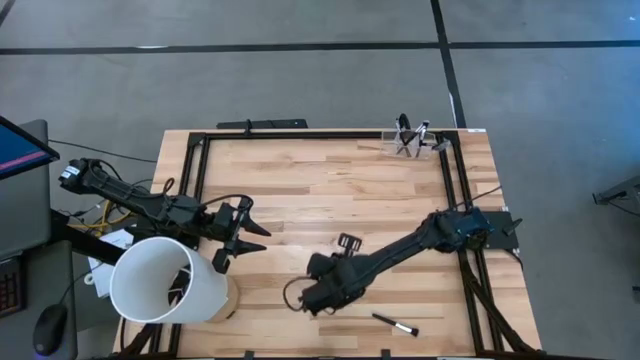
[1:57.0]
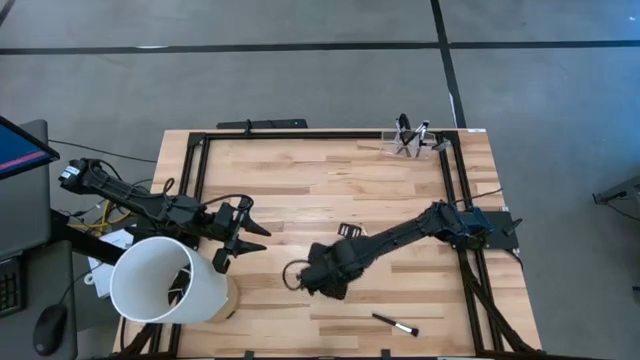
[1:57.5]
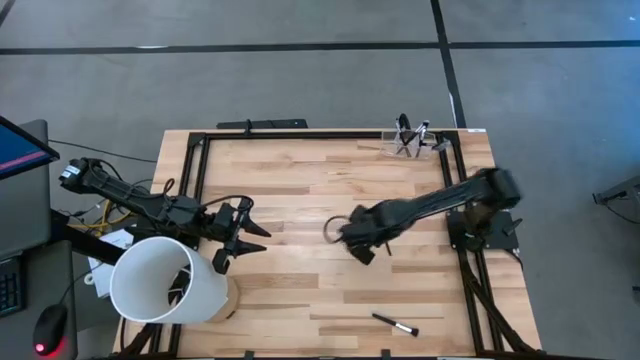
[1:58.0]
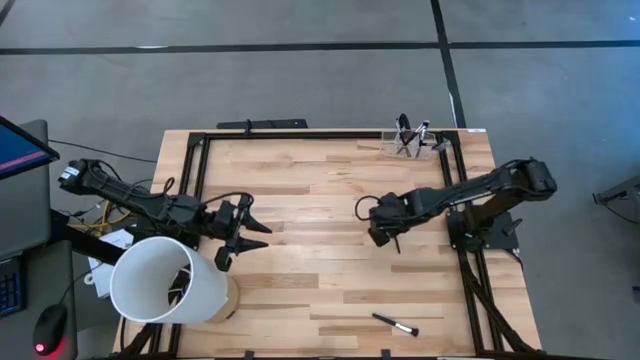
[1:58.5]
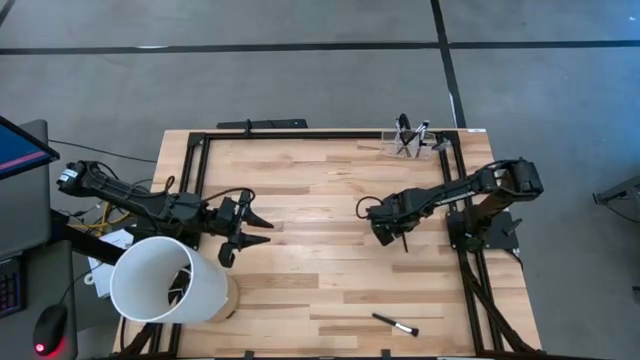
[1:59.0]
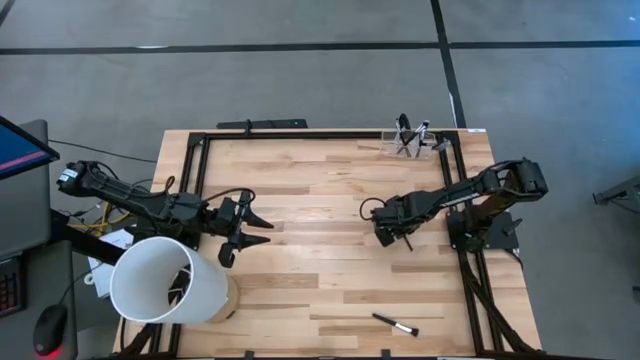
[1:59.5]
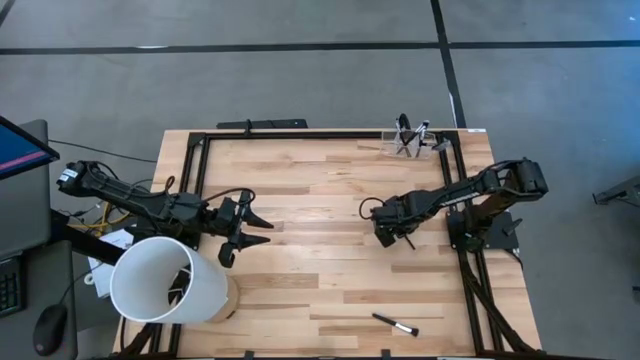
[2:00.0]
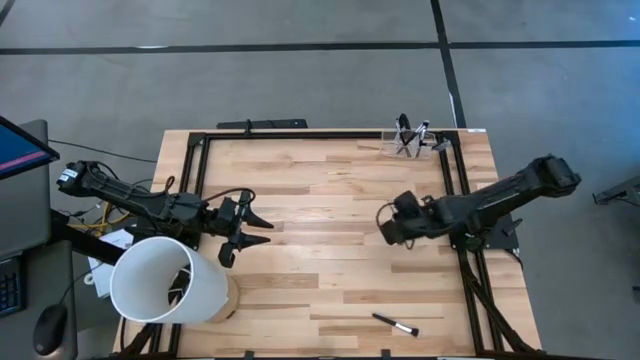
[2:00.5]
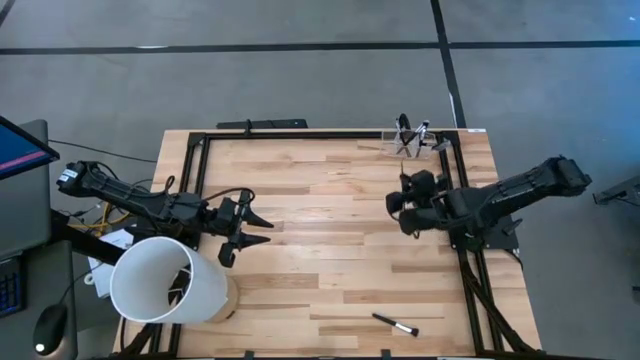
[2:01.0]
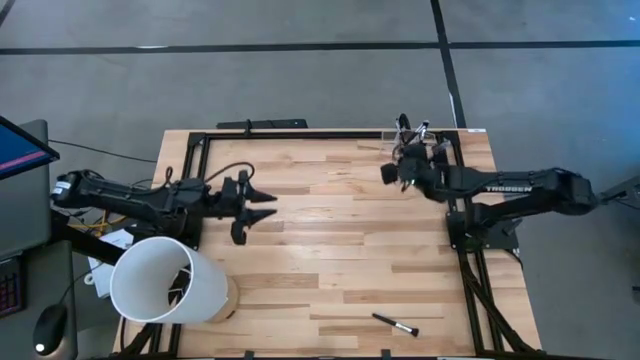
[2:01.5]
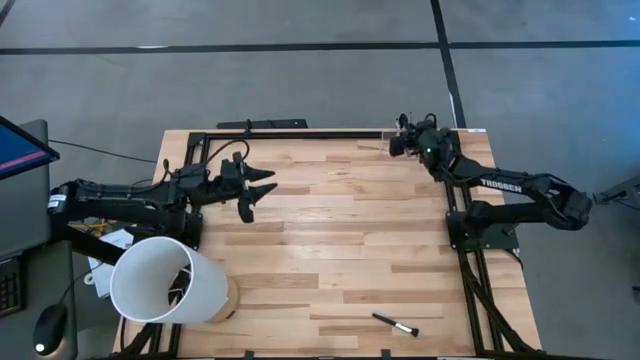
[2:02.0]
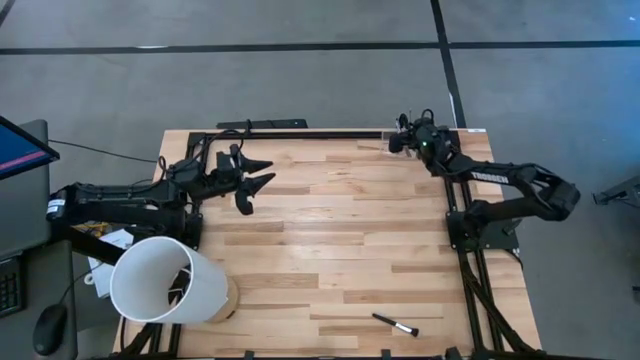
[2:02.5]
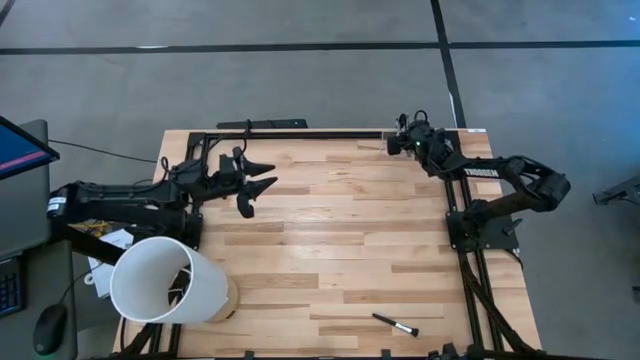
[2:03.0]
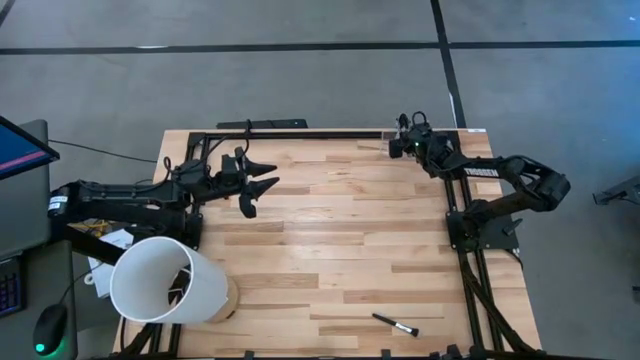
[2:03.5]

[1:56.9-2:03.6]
Task: Put items in baskets/containers
Put the black eyeshadow brush into the middle section of the transparent organizer

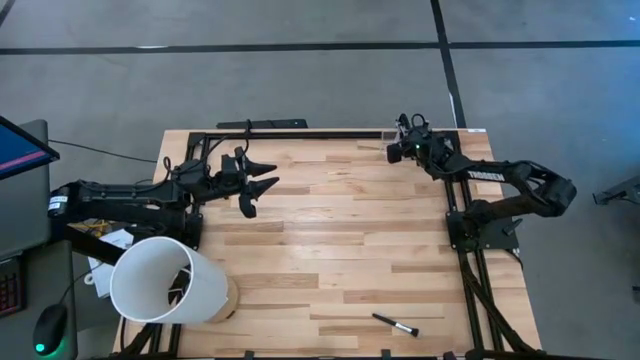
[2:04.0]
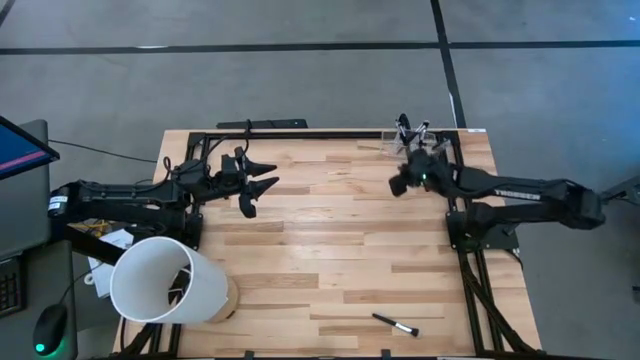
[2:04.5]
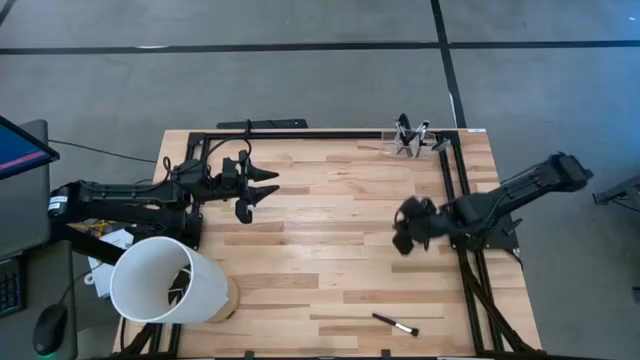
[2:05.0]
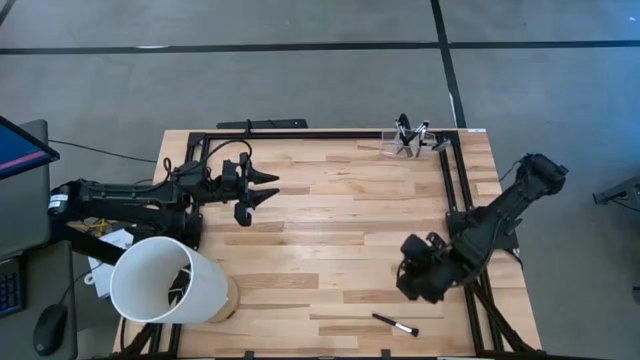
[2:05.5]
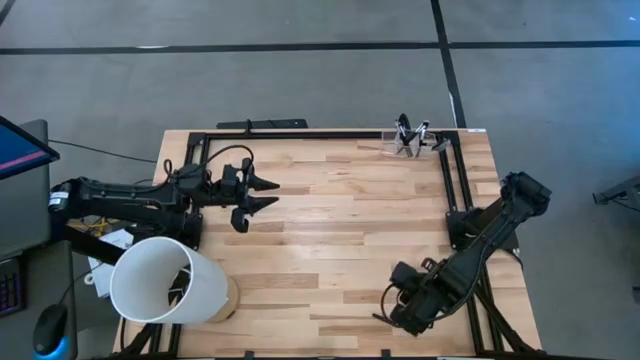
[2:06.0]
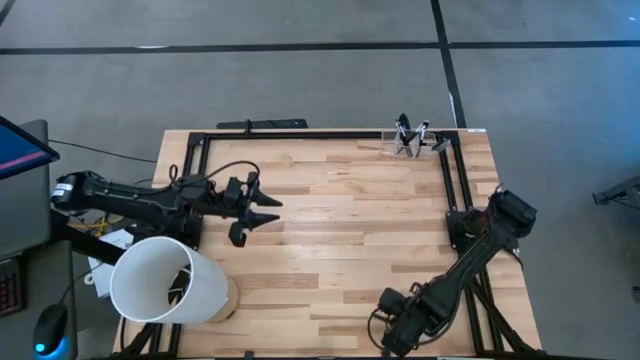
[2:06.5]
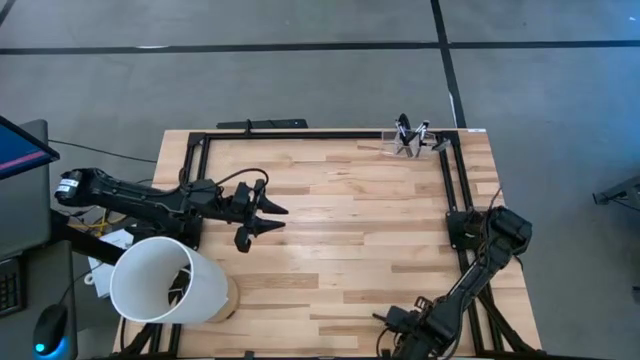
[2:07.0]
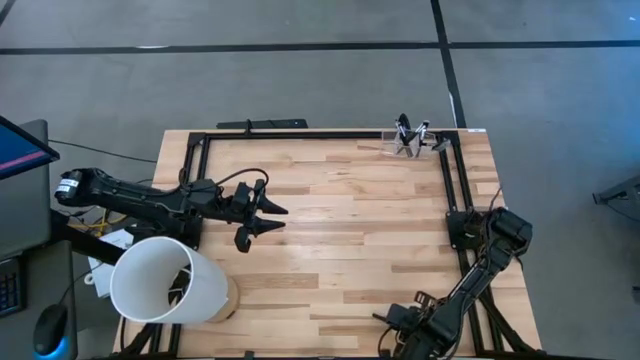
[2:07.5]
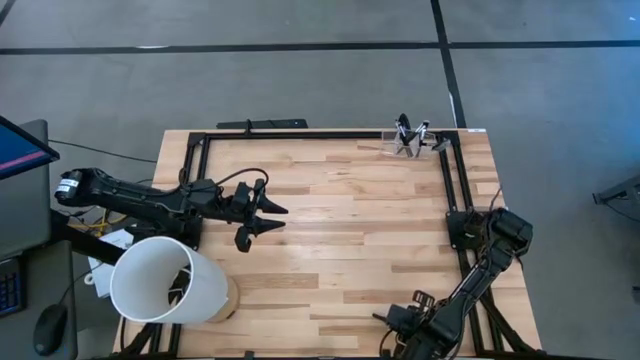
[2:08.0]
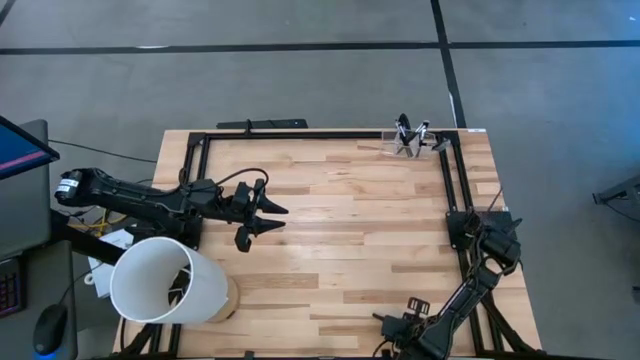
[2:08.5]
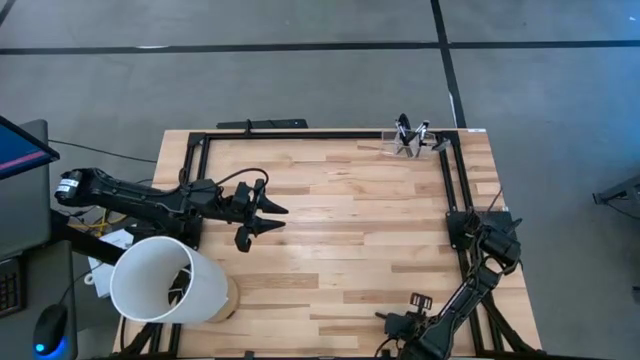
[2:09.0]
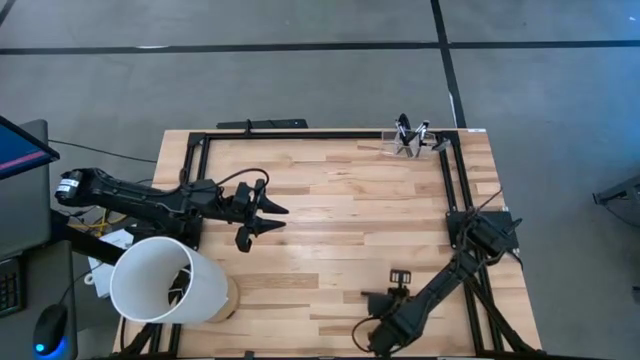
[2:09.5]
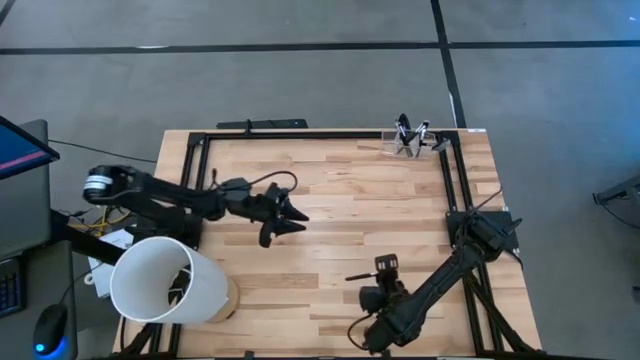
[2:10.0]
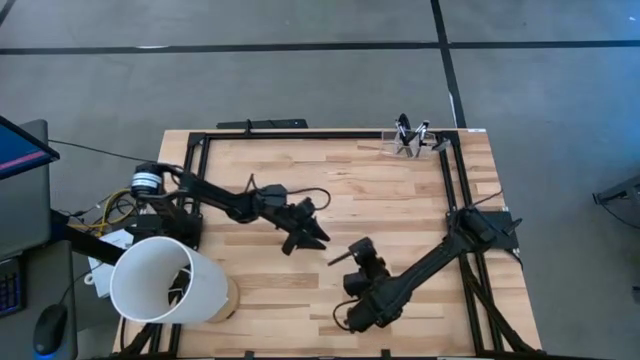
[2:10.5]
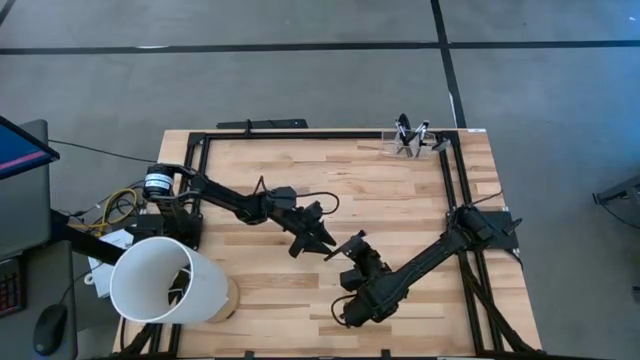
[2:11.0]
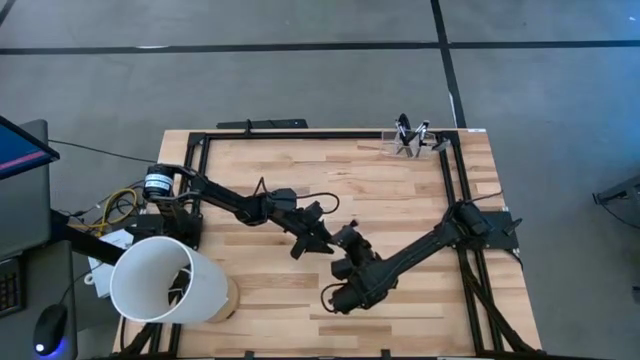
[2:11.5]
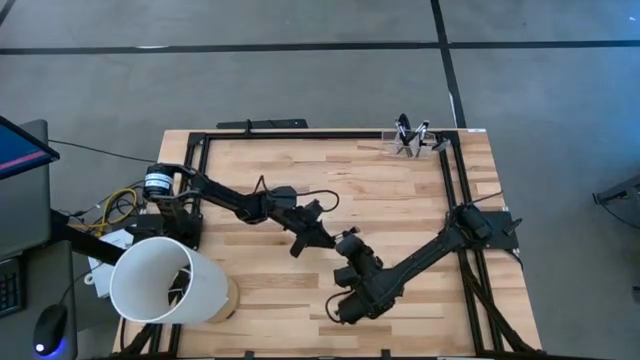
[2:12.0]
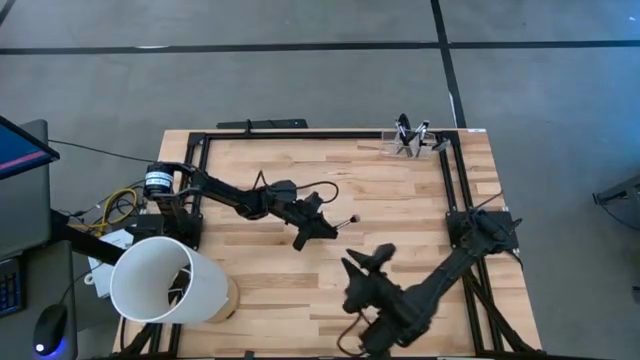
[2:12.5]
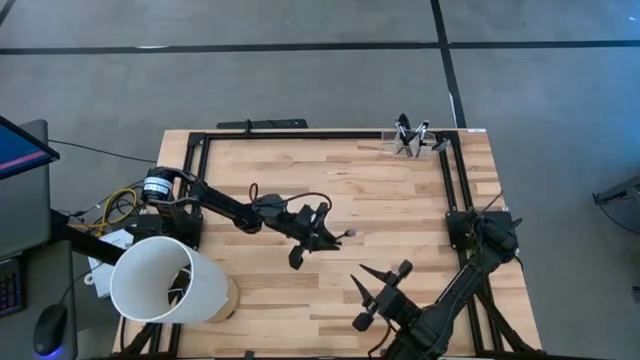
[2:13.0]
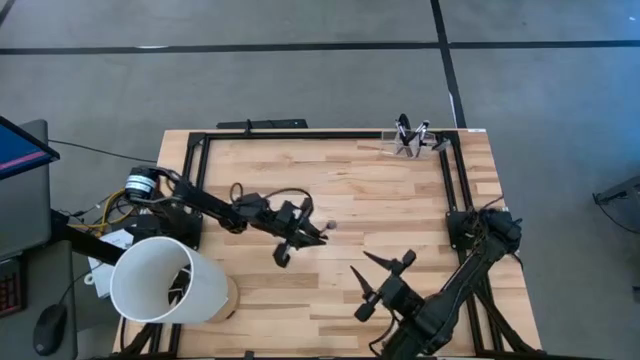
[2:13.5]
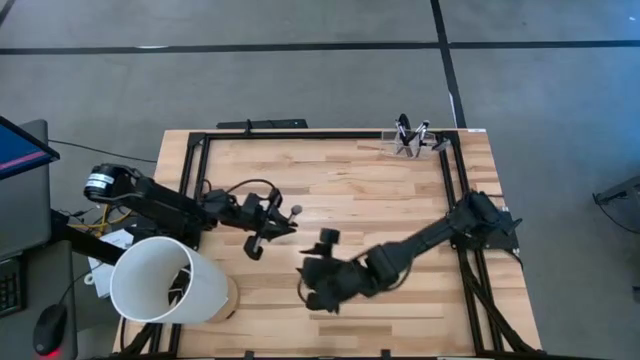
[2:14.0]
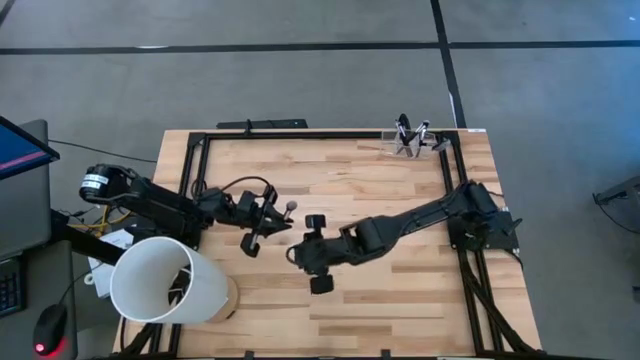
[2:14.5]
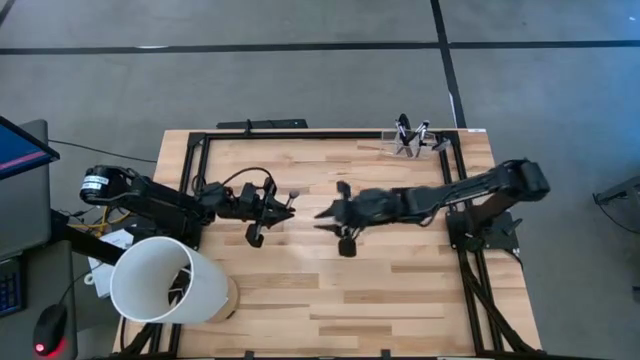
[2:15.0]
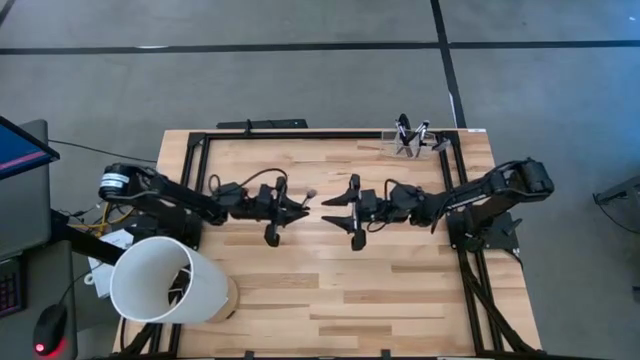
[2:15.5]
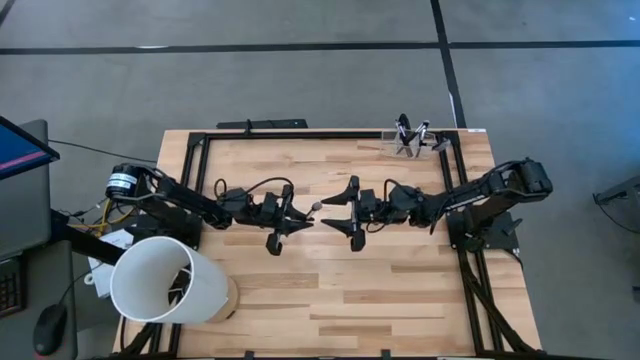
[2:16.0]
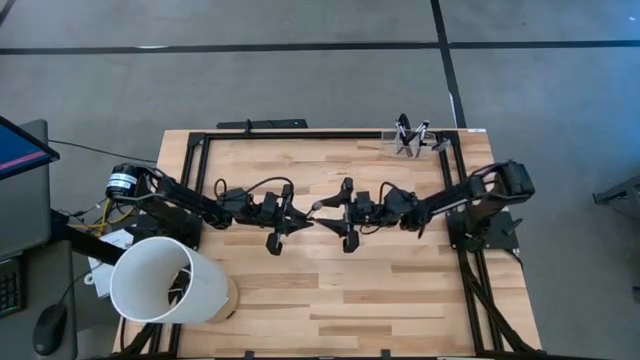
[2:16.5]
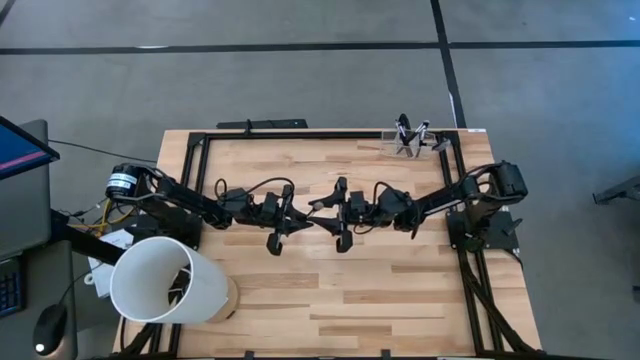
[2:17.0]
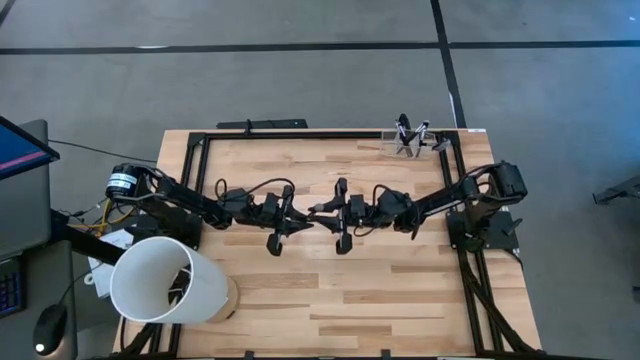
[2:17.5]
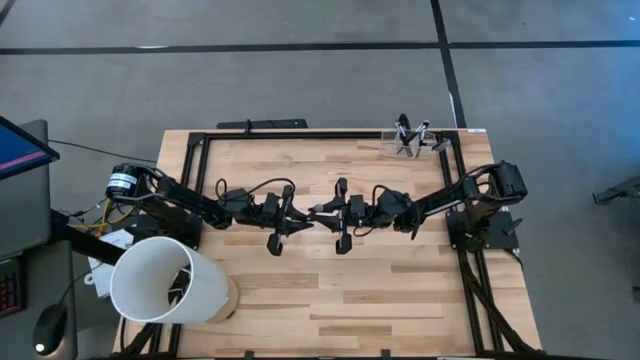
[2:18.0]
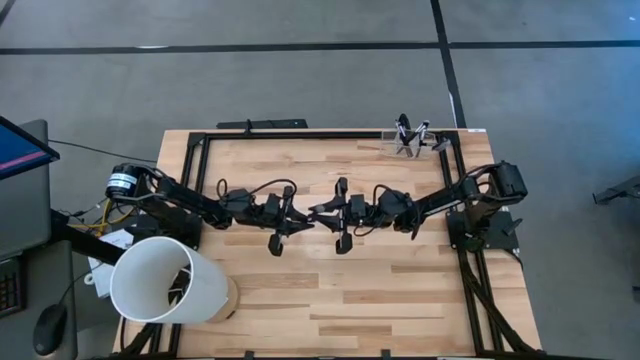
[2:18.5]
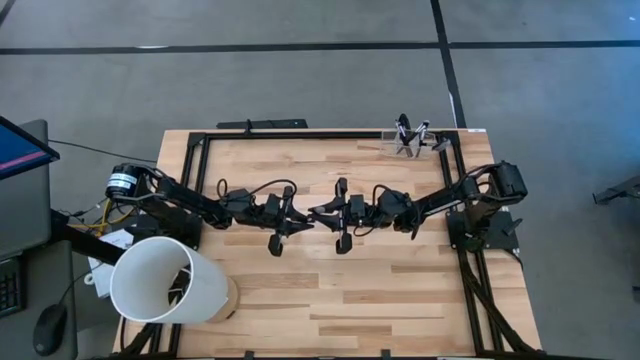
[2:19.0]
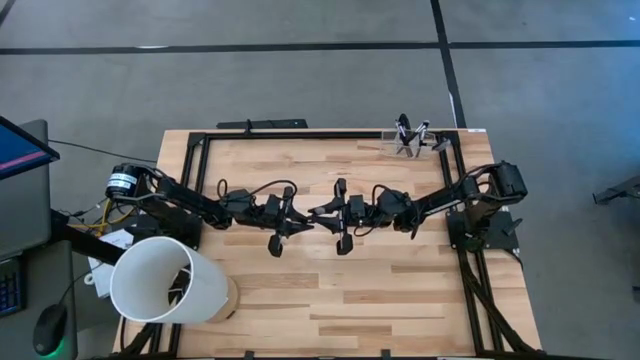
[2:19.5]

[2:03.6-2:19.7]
Put the powder brush into the right section of the transparent organizer
